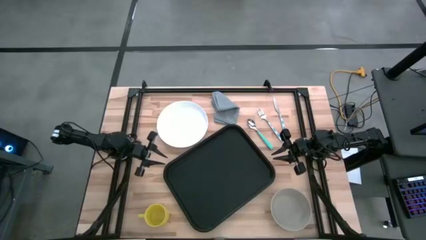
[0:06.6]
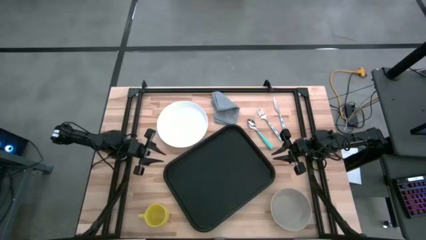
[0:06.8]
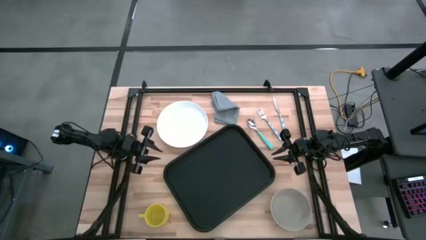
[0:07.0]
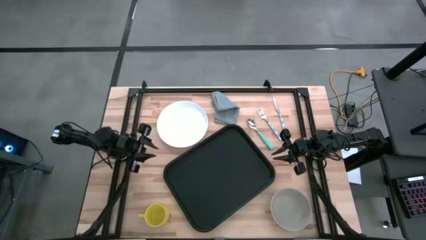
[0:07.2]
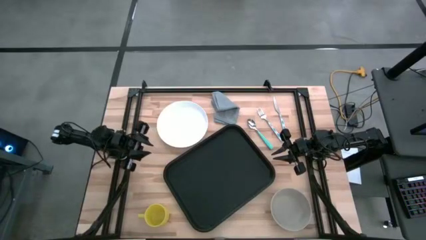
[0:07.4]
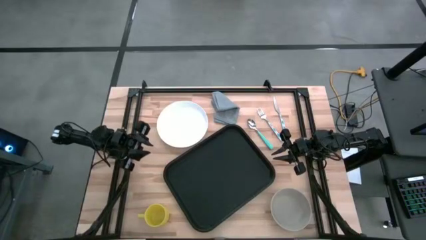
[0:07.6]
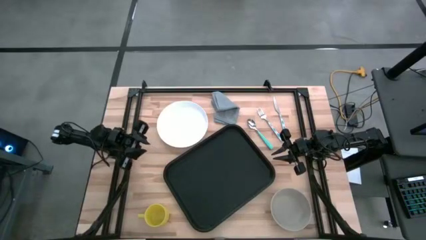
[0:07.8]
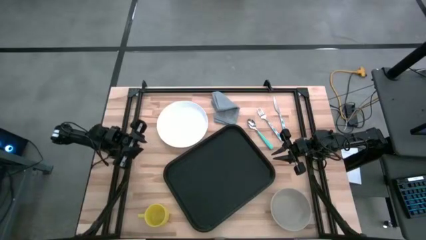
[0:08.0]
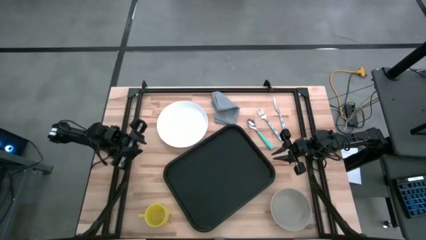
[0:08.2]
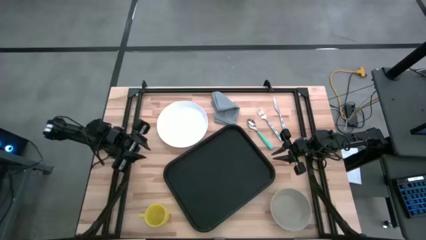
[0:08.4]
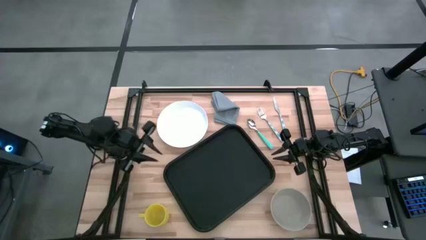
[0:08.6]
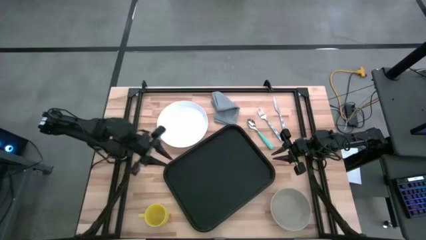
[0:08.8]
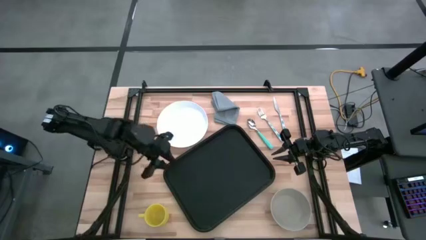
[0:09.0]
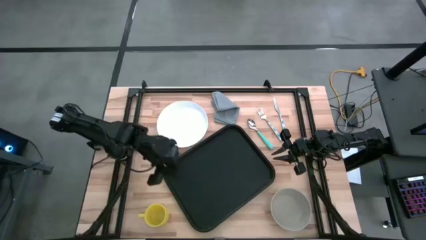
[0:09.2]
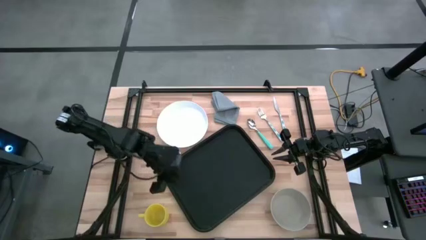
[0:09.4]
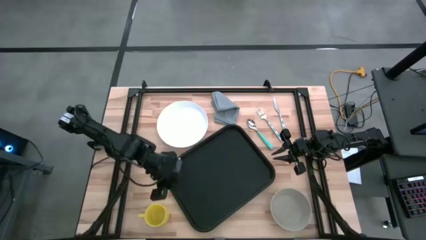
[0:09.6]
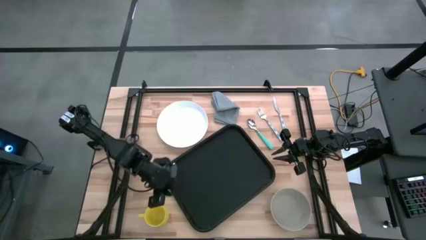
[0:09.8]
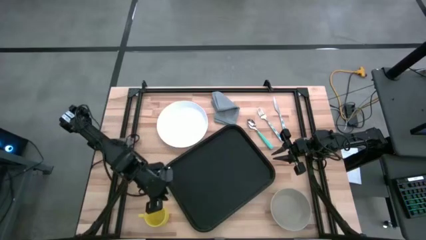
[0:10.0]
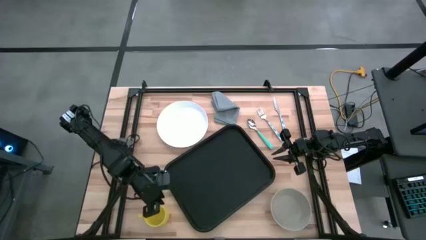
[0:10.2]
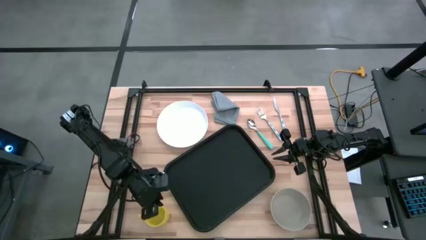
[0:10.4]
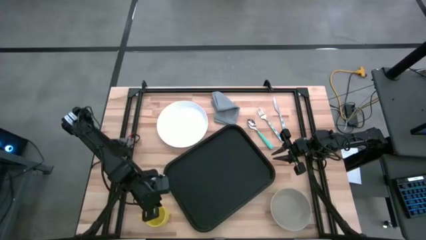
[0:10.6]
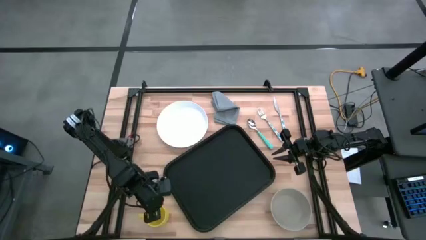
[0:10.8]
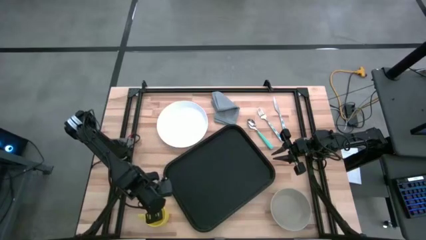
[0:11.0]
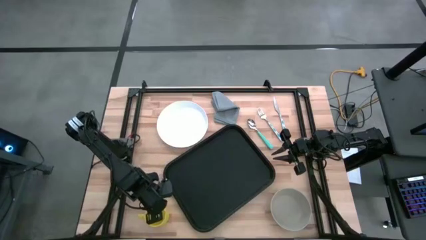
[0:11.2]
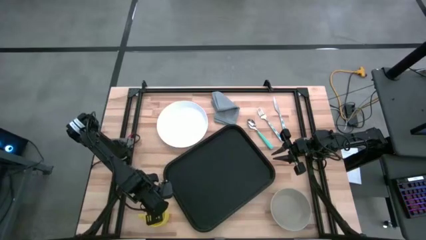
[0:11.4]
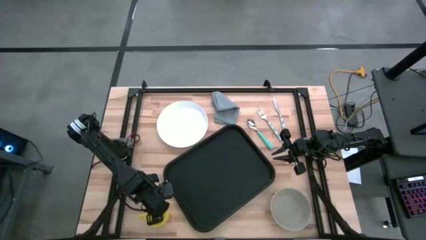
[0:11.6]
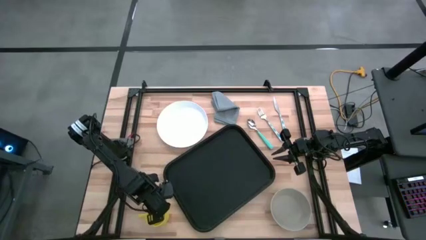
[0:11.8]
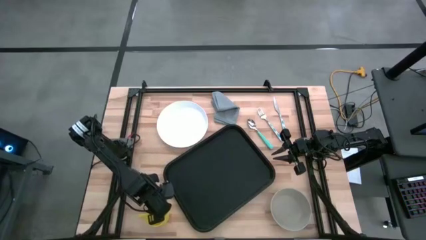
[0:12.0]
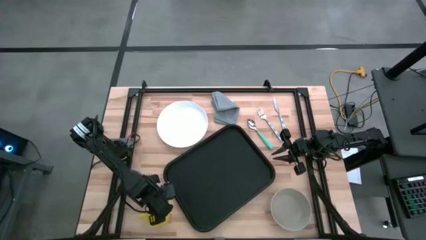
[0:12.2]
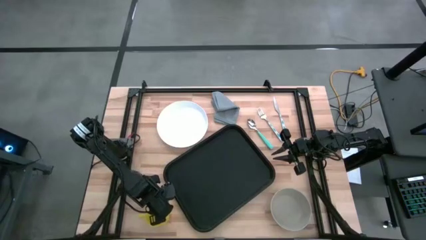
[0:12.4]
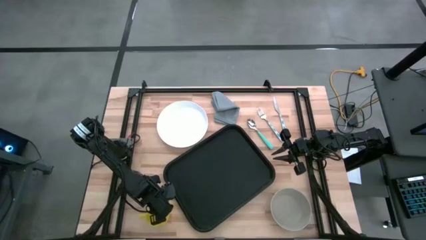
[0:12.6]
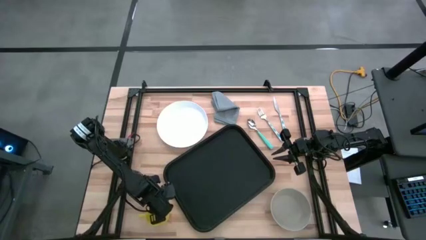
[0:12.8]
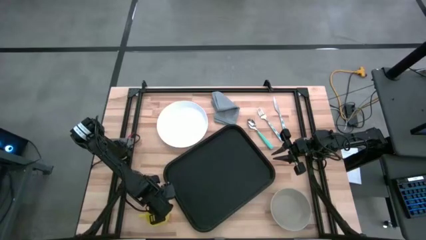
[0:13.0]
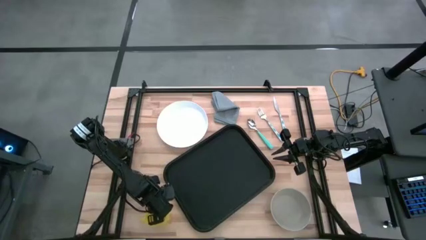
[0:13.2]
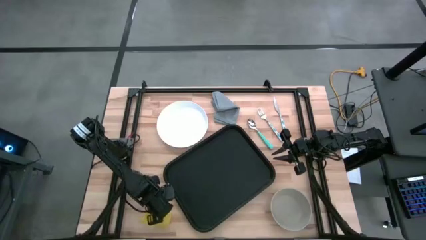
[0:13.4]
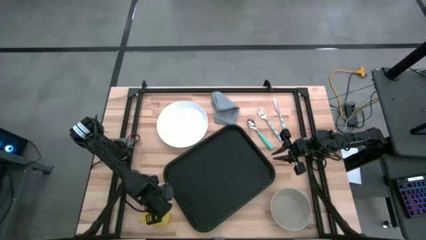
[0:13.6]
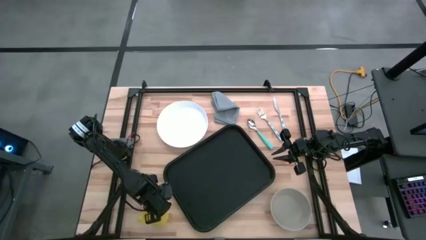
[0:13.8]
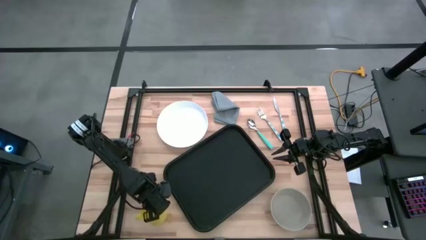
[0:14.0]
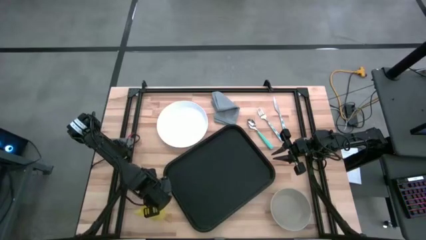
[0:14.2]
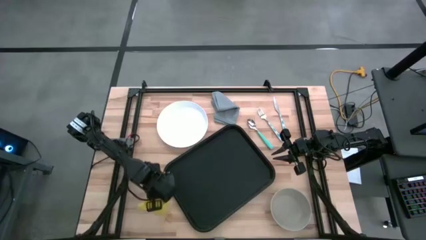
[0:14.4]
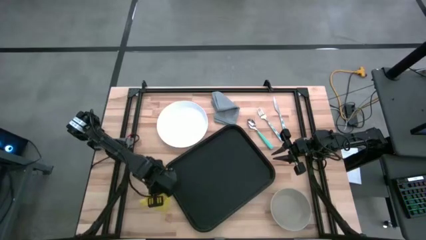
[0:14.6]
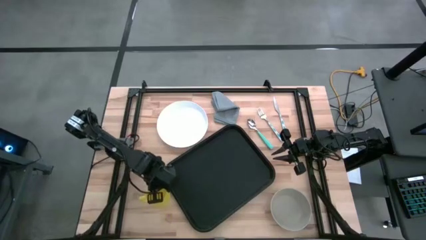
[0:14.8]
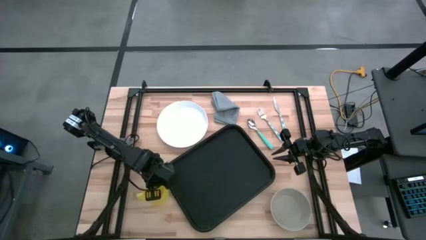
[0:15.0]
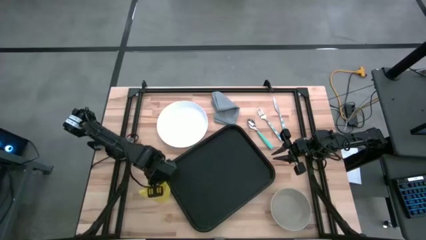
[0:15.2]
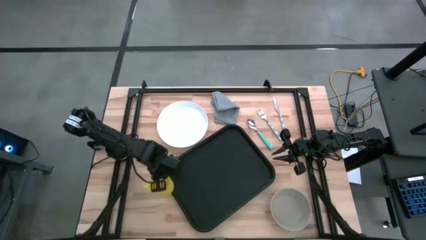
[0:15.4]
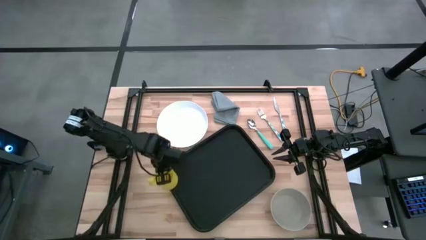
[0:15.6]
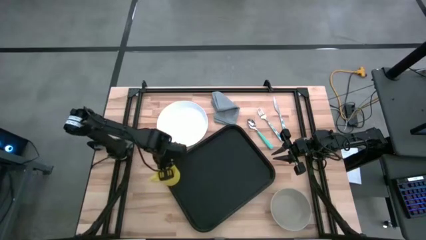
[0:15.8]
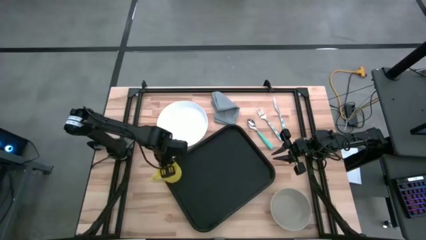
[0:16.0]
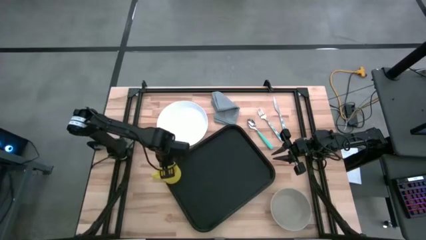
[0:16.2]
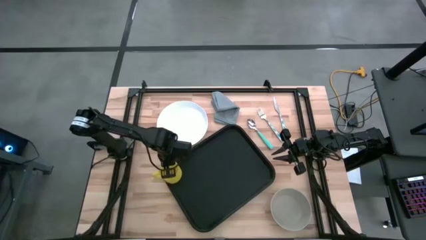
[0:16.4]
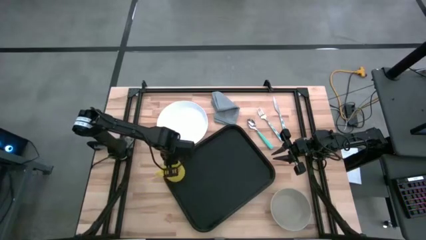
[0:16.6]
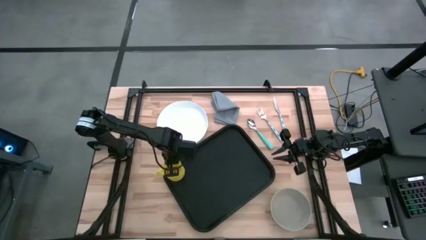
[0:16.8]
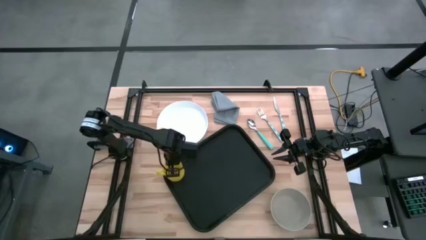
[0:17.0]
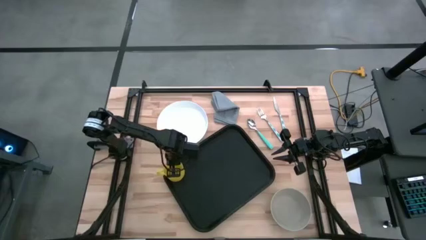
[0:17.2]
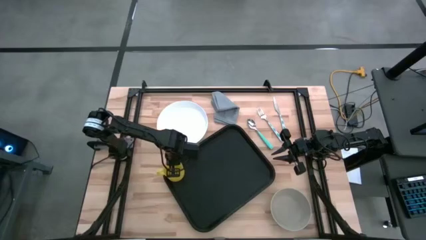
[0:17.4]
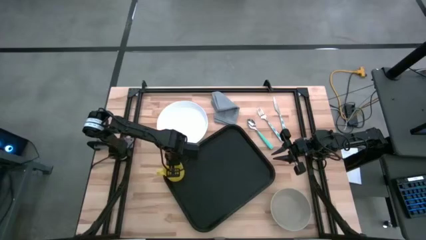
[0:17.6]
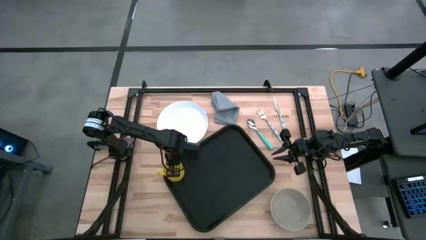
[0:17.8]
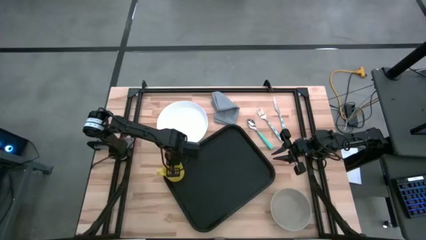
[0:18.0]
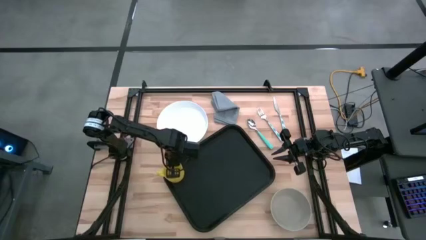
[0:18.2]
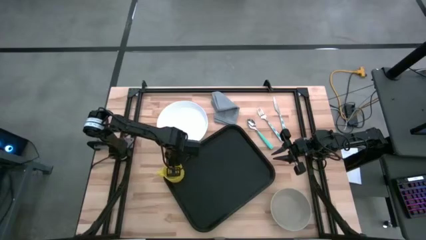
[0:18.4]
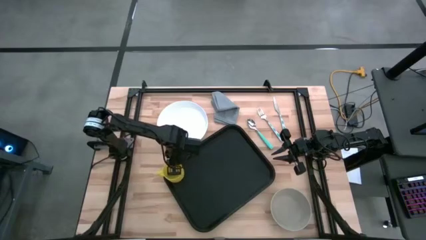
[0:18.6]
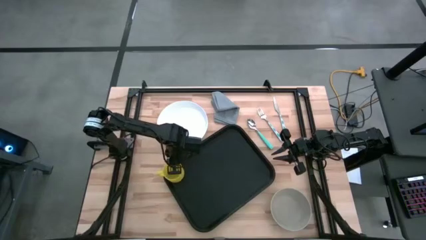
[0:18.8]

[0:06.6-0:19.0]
Task: Set up tray
Put the yellow mug on the black tray

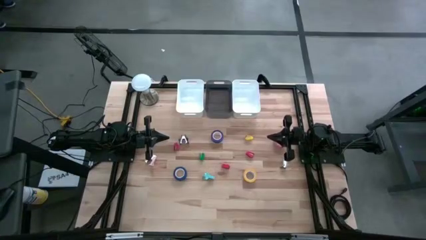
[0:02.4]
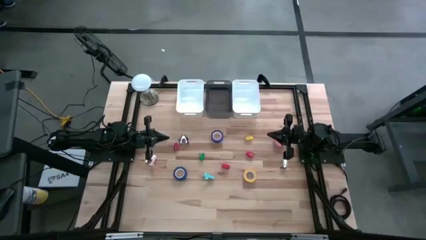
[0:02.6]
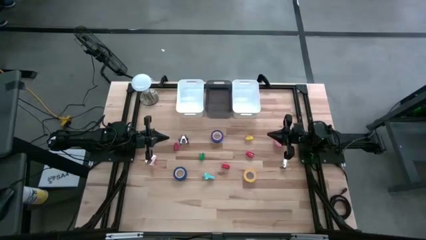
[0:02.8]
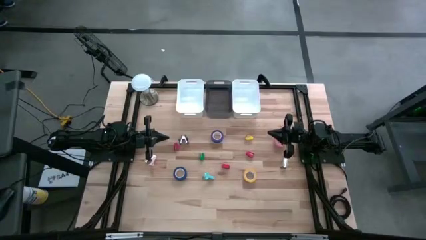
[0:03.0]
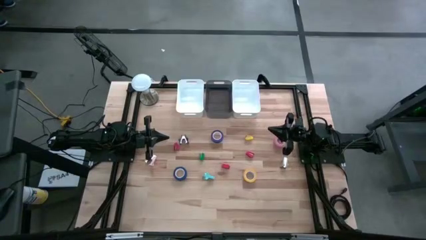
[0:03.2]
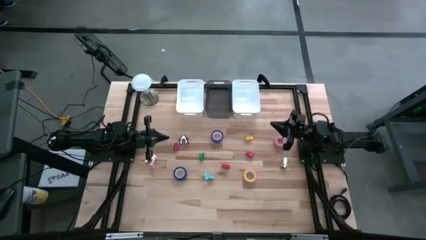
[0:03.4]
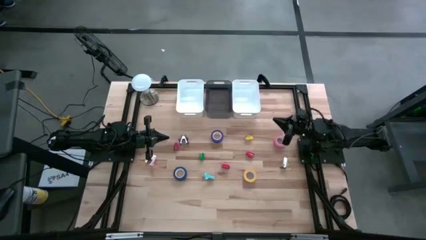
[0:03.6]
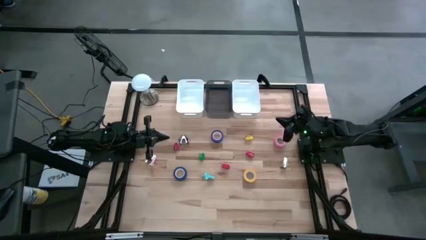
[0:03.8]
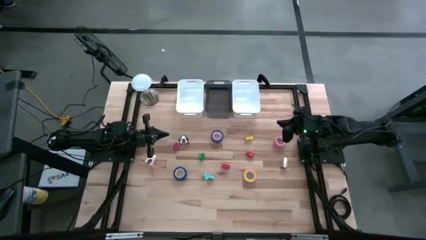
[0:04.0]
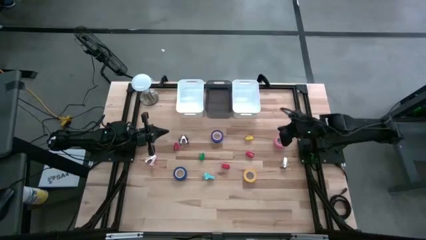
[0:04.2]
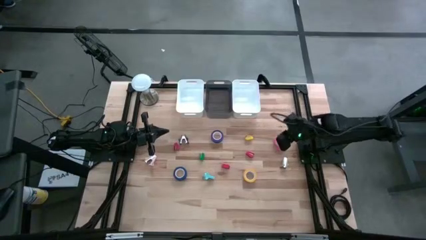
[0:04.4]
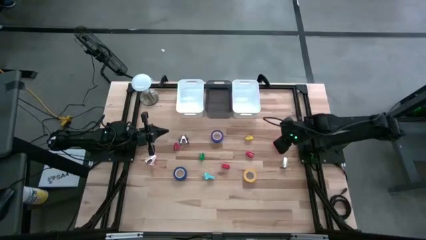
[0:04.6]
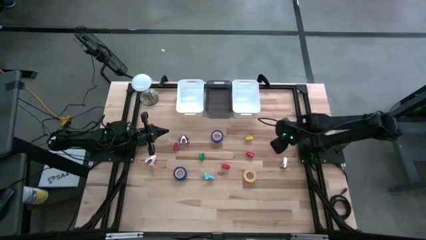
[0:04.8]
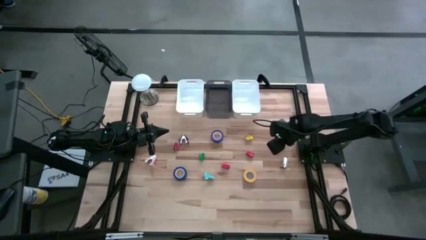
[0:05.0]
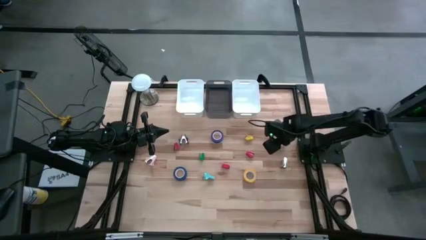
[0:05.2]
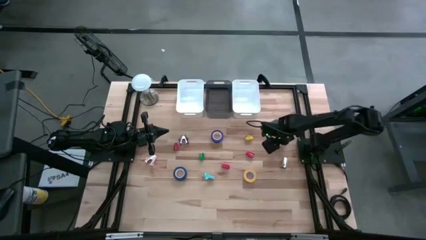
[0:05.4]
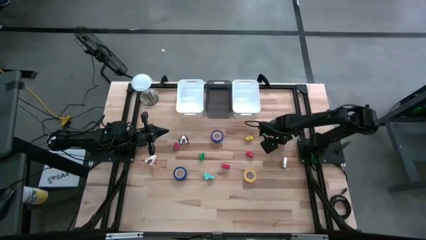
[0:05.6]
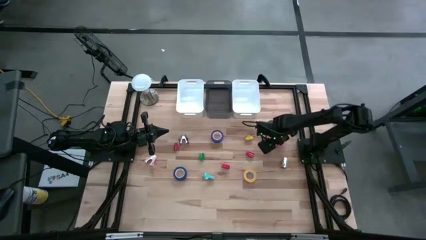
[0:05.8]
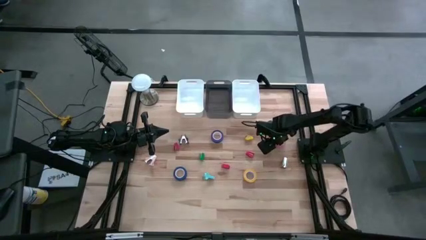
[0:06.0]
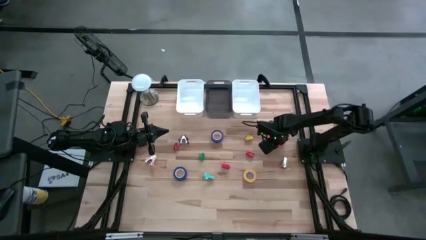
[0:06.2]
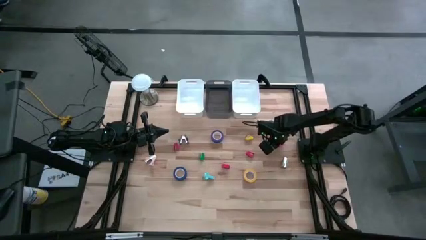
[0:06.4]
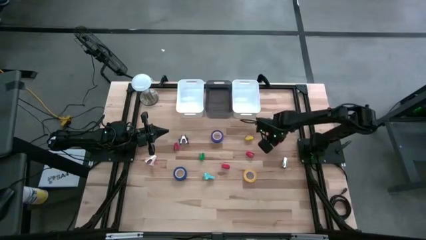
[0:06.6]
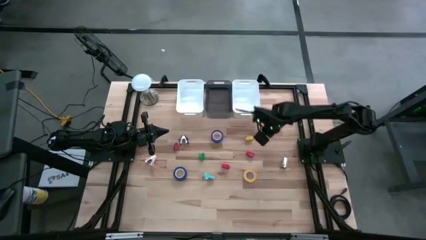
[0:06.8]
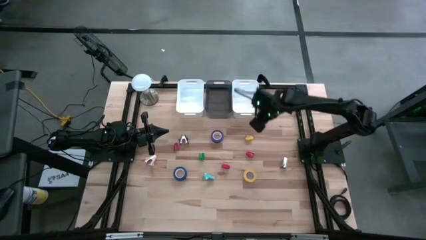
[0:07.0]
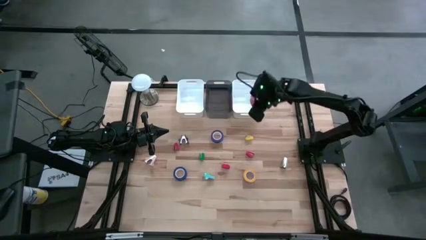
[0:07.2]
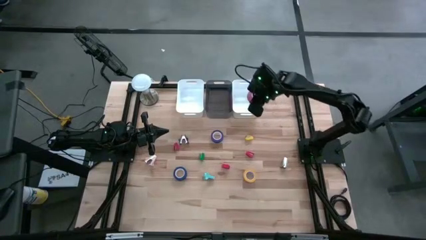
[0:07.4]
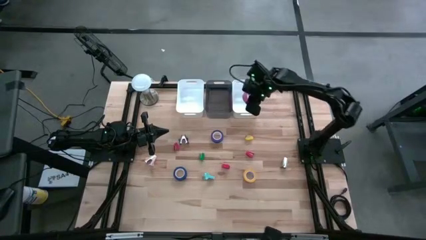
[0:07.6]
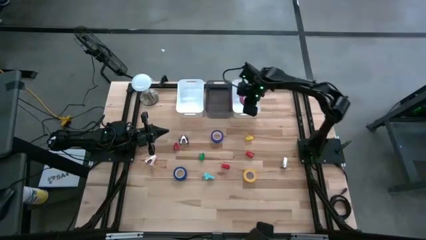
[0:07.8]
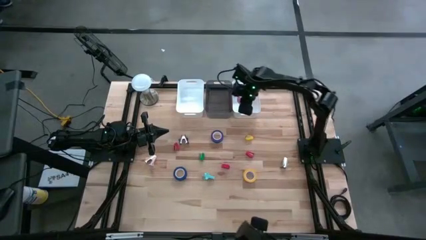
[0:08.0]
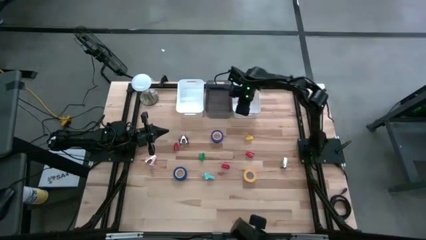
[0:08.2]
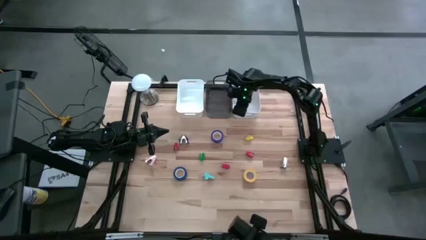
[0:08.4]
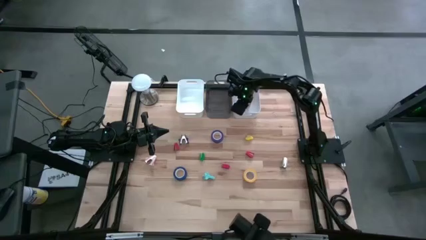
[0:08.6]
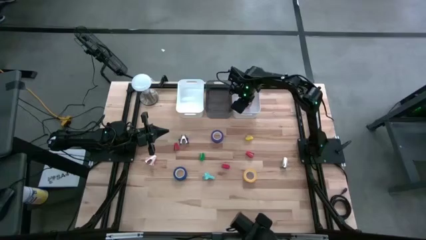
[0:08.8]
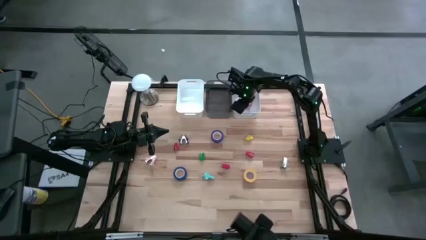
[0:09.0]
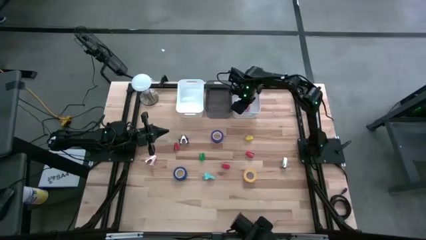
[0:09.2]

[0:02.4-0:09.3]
Task: Pick and place Stapler, Stapler remover, tape
Put the pink tape into the right white bin
